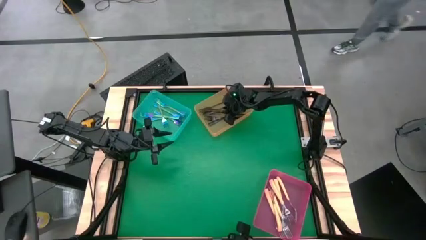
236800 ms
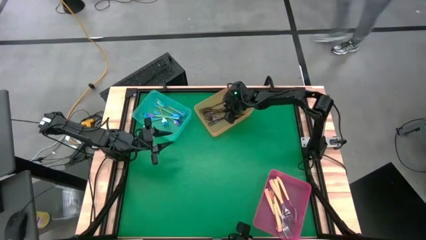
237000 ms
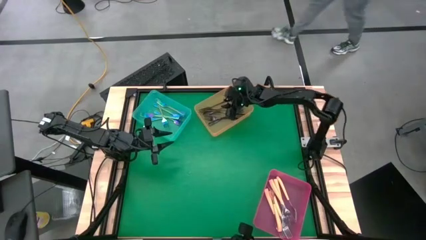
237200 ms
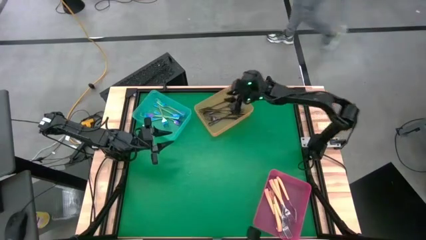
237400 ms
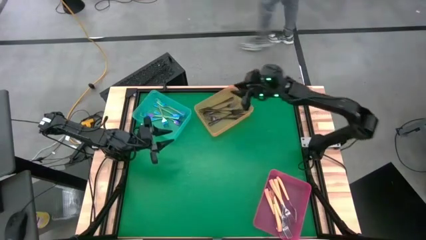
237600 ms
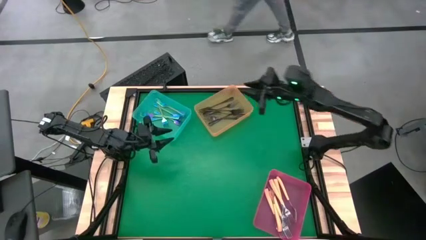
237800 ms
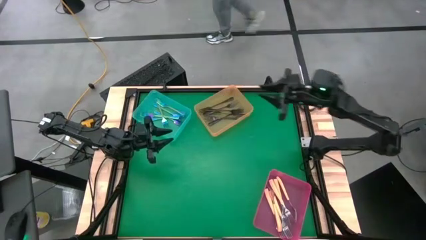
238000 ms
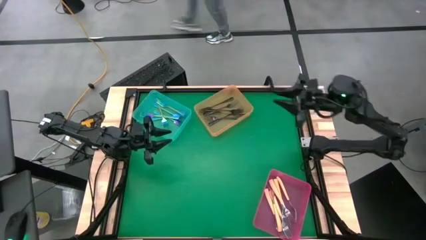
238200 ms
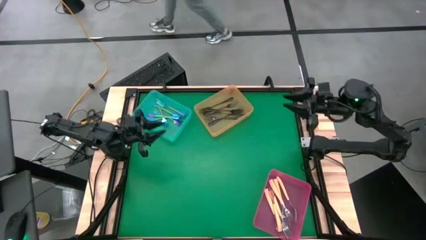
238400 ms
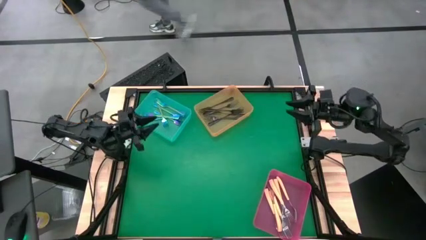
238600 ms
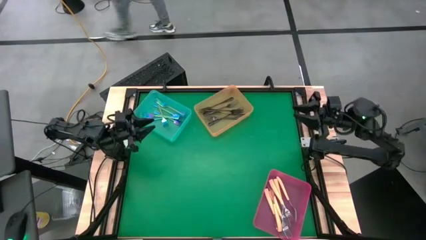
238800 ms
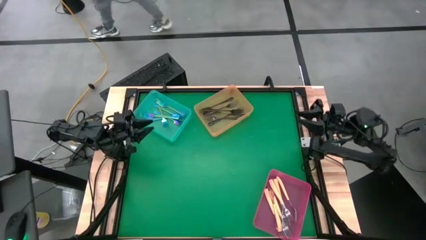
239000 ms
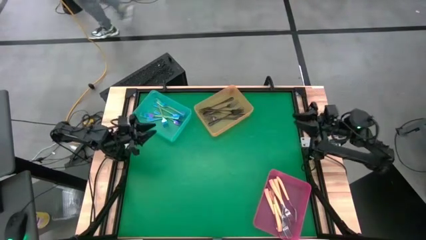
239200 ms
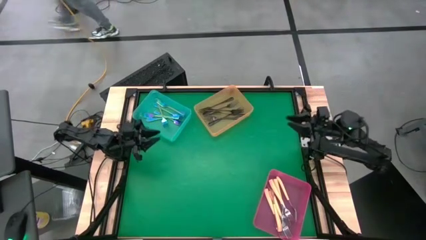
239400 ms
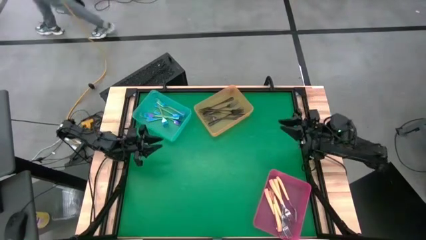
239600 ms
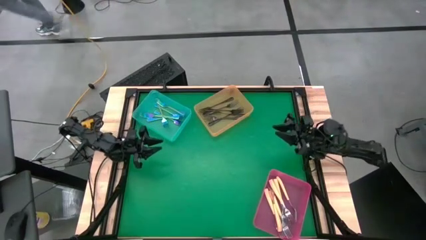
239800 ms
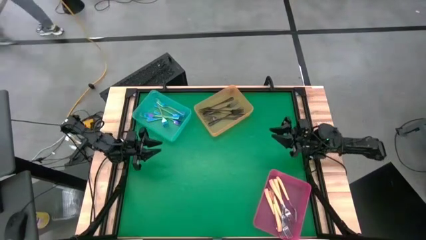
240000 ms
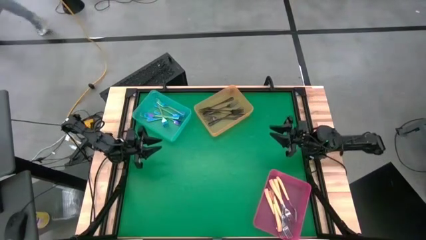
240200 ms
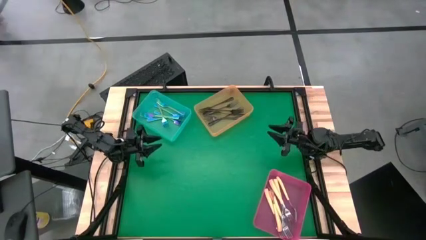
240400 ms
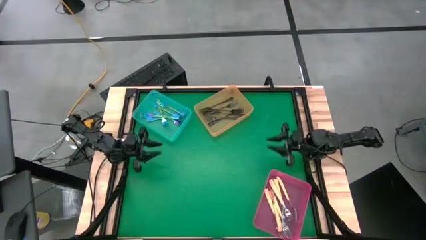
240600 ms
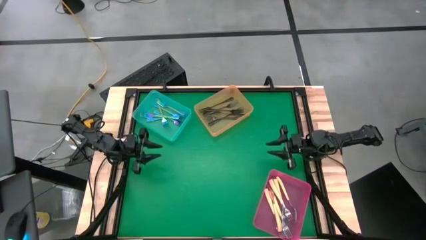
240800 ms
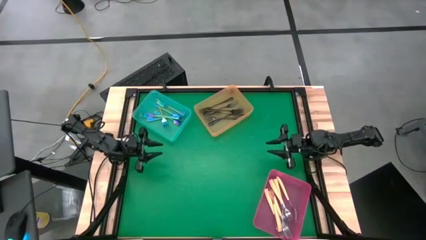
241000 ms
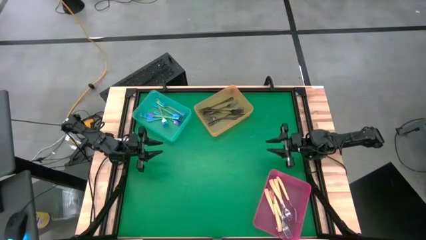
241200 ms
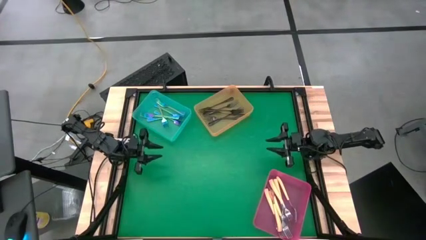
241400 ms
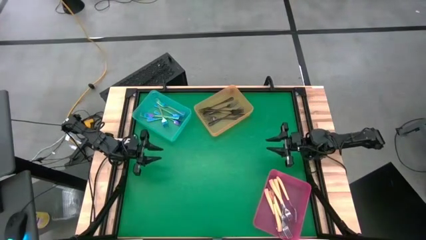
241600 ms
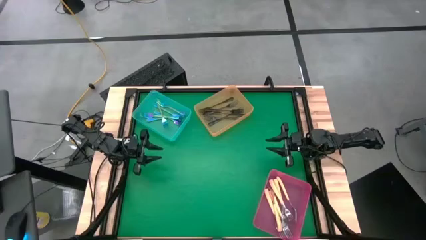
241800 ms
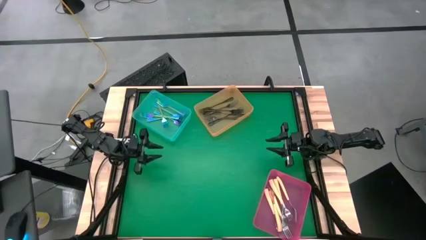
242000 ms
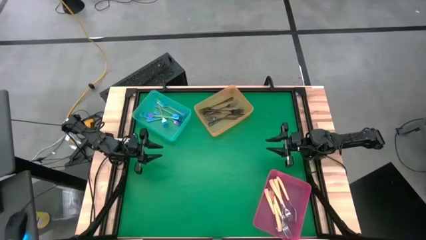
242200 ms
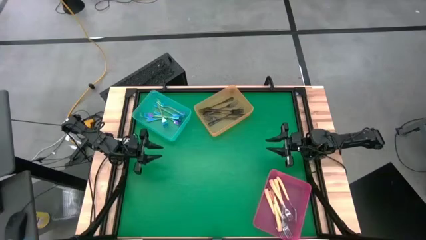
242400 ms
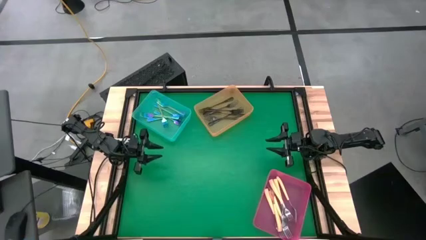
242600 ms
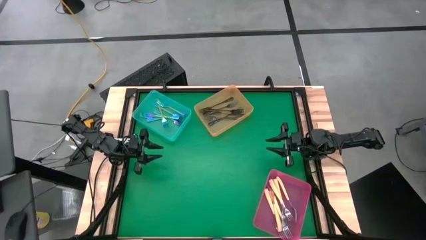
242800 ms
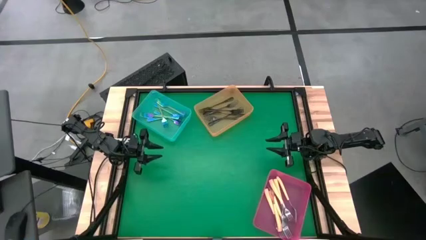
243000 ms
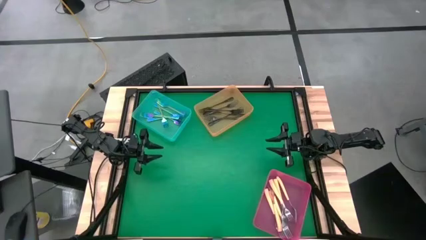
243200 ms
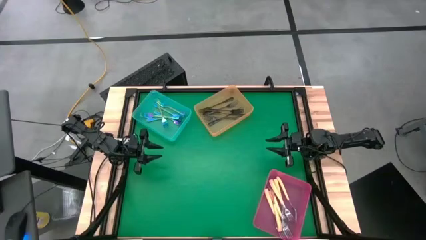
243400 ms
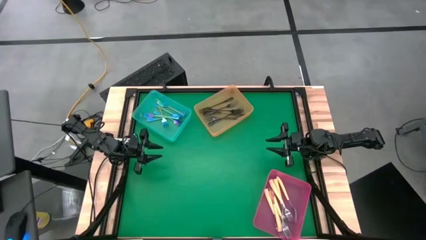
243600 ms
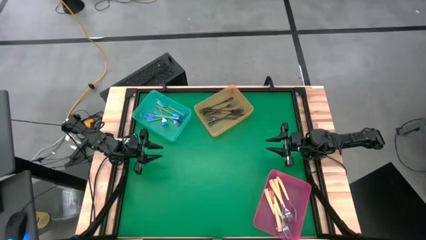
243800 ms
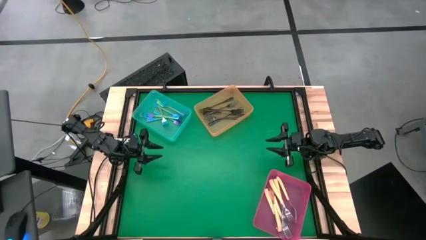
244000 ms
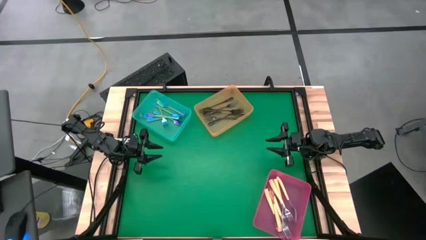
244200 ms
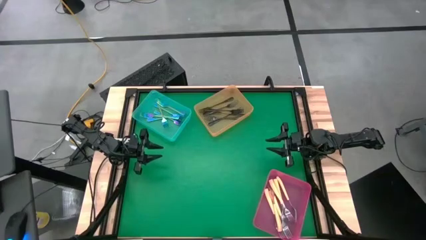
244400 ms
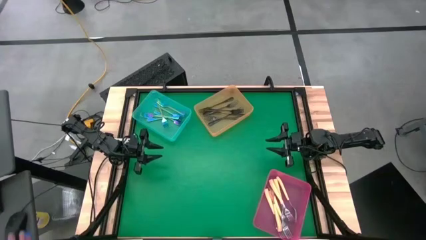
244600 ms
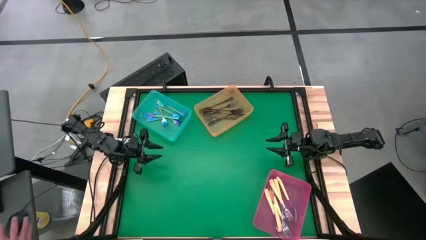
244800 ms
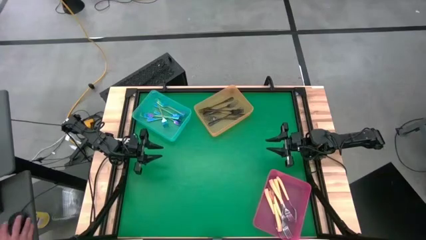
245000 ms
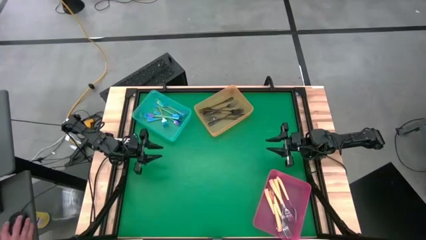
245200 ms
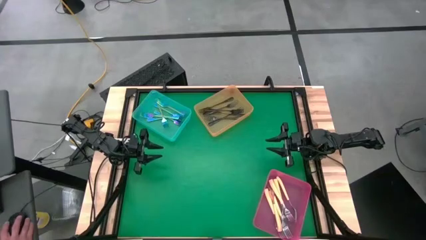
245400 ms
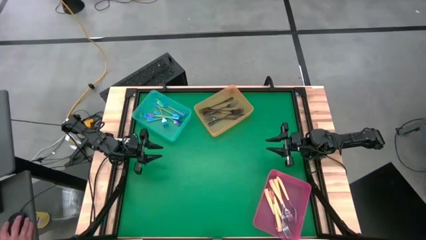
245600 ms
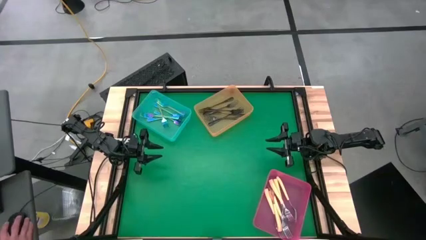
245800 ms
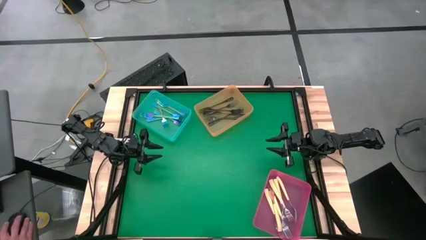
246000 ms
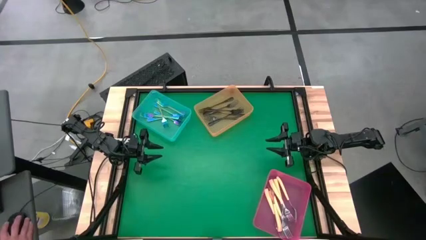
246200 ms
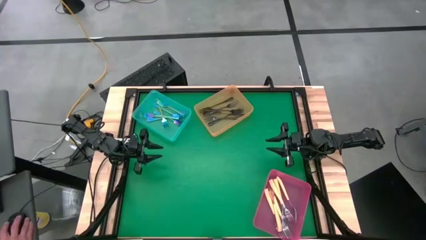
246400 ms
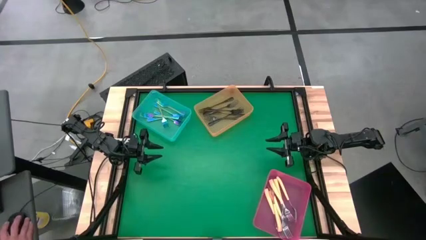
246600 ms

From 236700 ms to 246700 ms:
Task: Sort silverware by color (type)
Return to Home Position

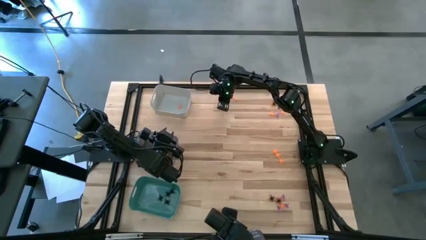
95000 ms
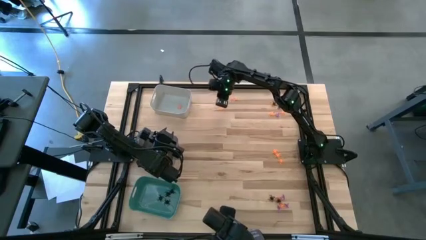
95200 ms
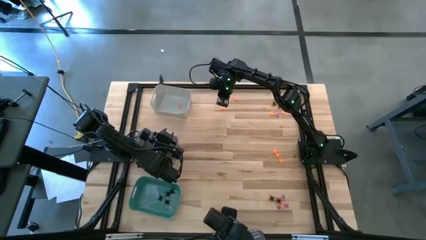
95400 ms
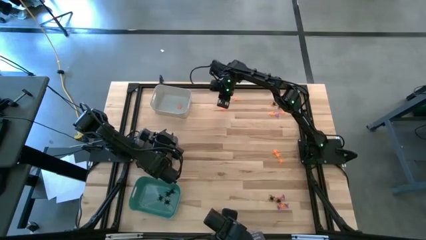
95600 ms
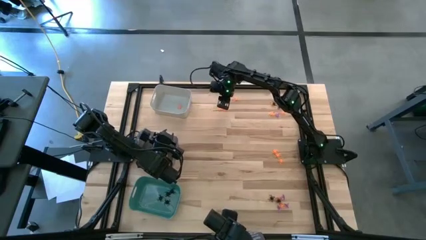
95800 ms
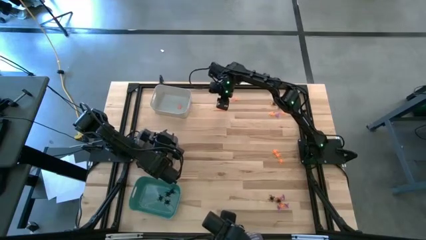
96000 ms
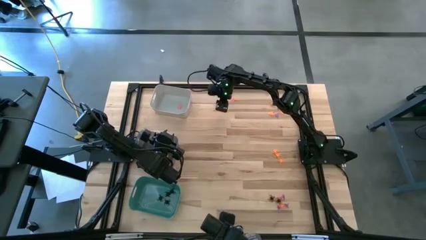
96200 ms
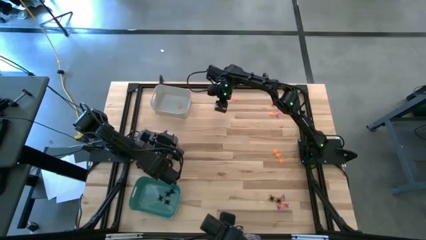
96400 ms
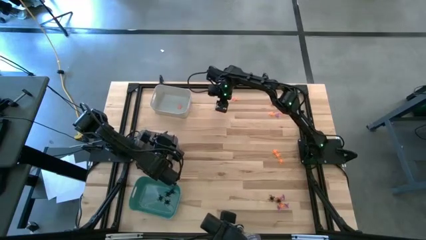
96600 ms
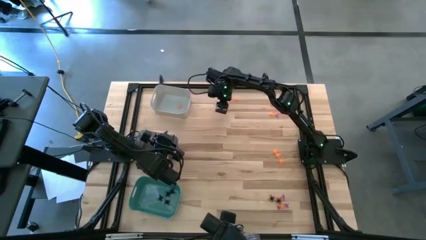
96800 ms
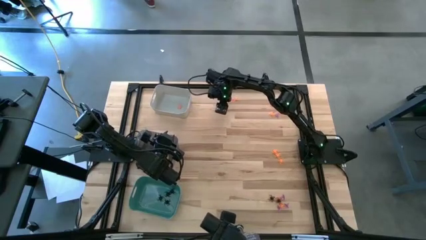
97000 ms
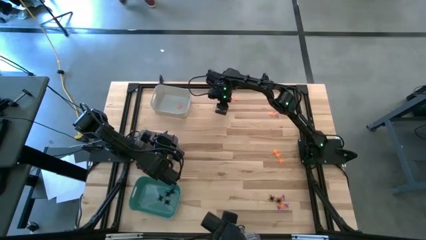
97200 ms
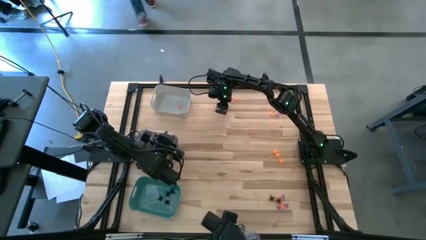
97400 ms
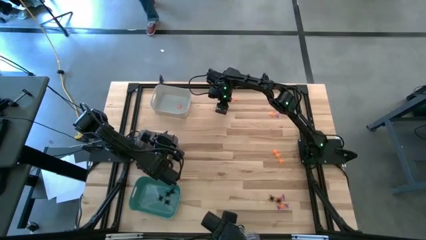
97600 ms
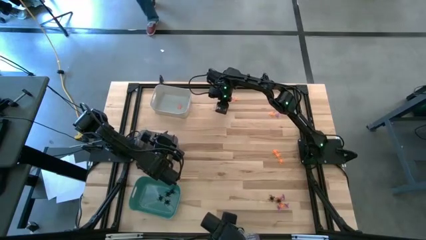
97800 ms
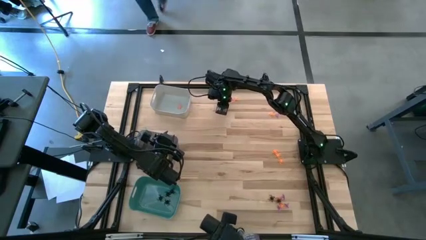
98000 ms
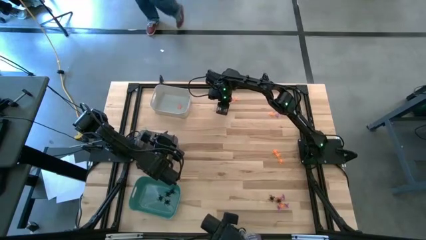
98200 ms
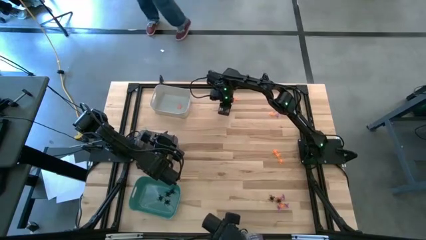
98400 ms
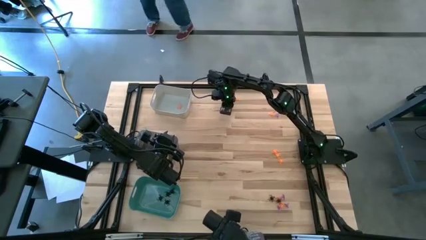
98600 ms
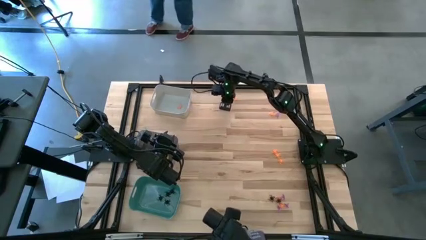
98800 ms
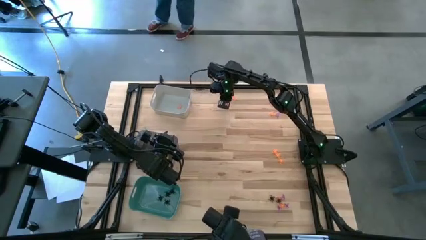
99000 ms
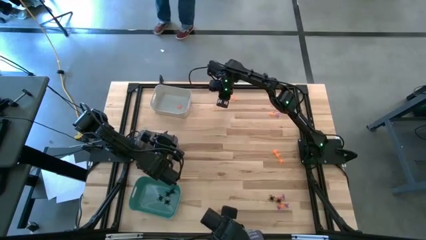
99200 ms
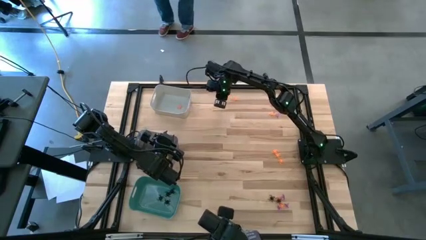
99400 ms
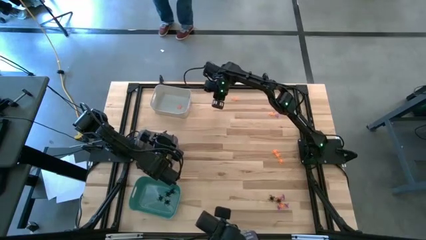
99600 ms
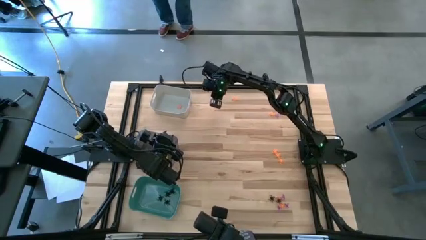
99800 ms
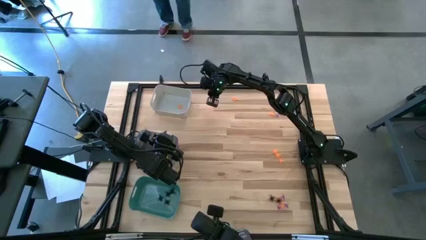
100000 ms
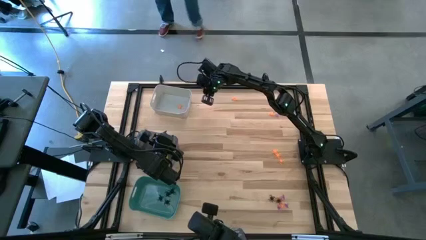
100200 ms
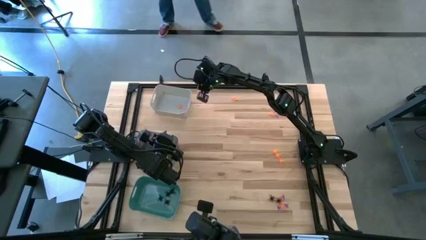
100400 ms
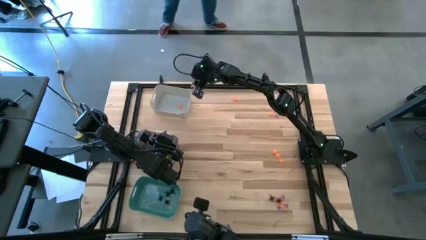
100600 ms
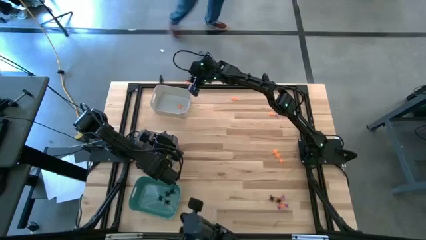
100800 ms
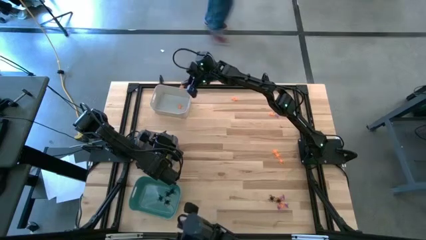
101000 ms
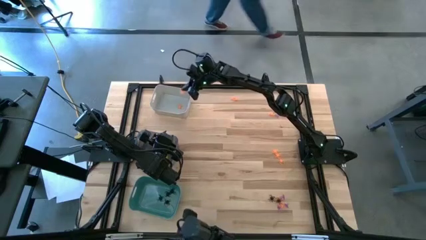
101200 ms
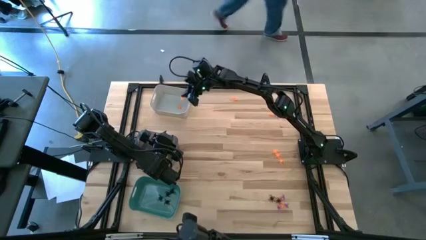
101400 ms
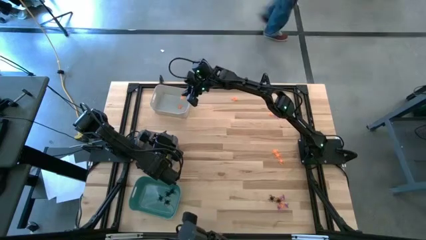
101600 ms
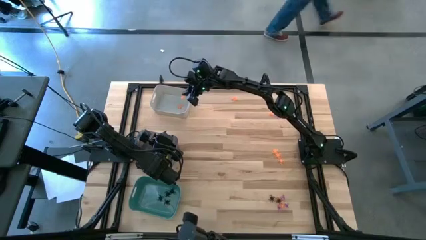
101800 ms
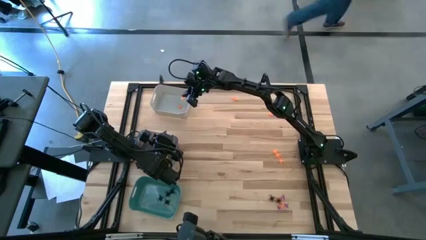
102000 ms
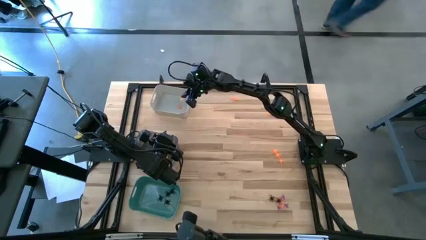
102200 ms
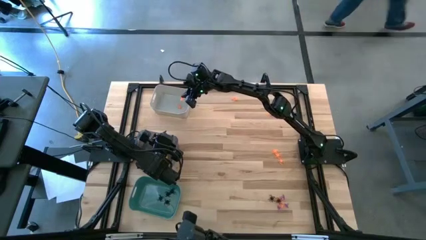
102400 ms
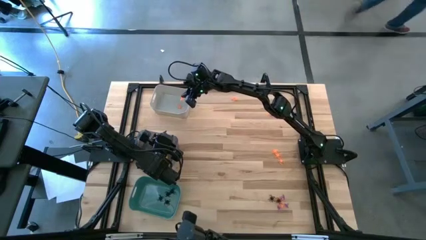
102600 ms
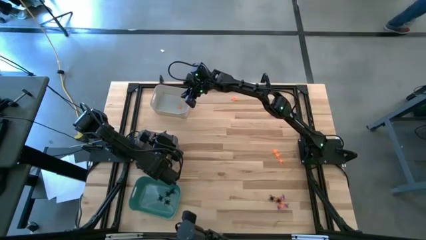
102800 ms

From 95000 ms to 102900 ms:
Task: Sort Halloween decoration
Put the top center orange spider into the gray bin
